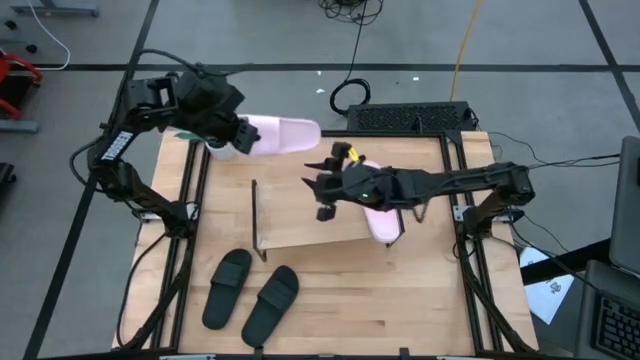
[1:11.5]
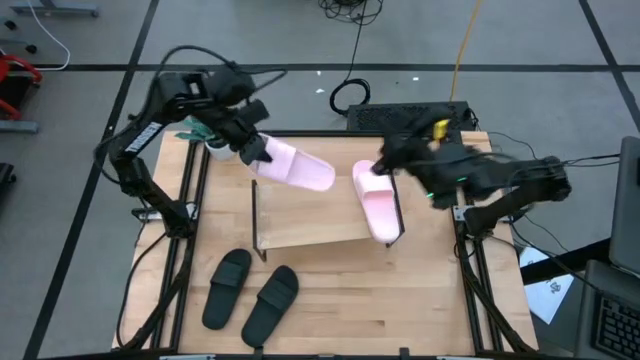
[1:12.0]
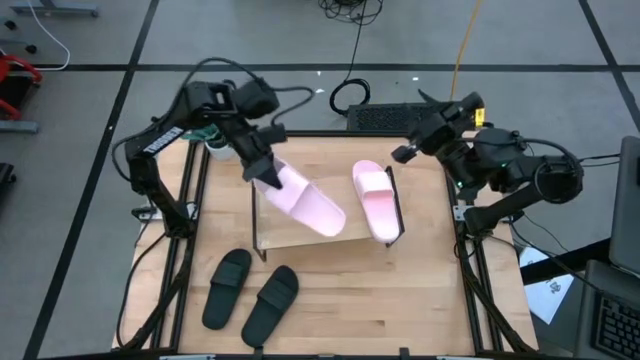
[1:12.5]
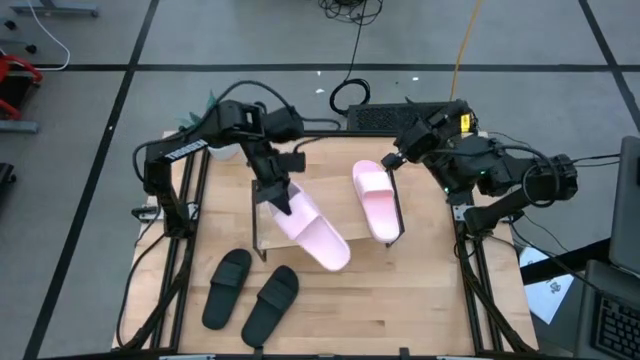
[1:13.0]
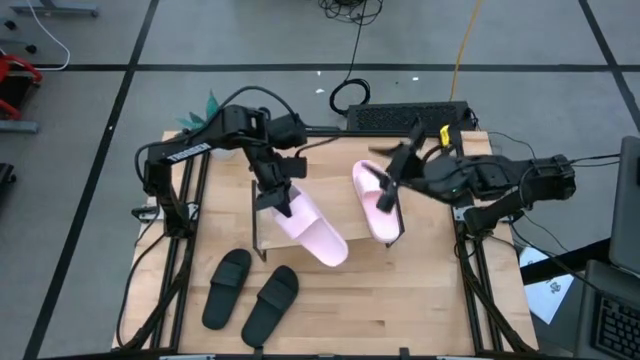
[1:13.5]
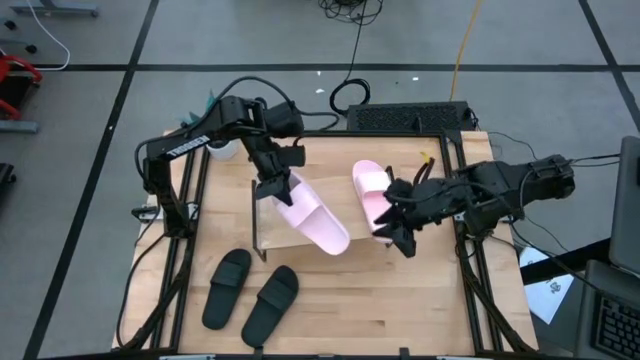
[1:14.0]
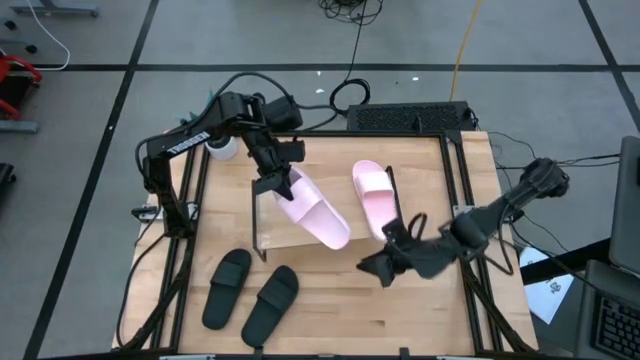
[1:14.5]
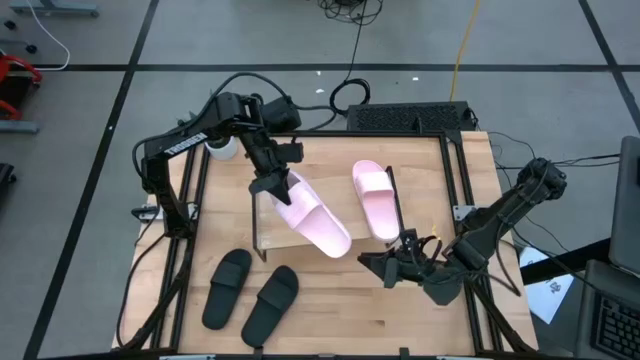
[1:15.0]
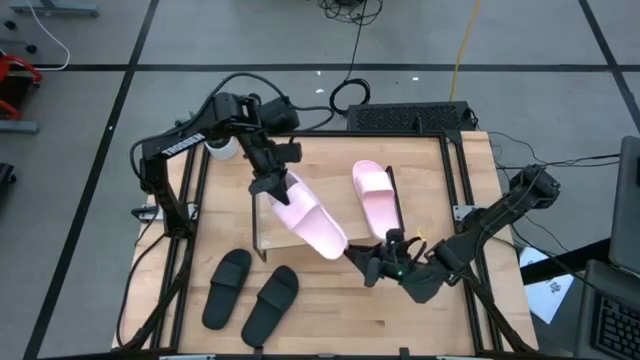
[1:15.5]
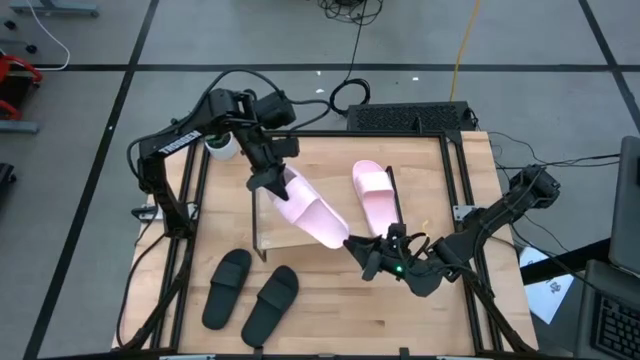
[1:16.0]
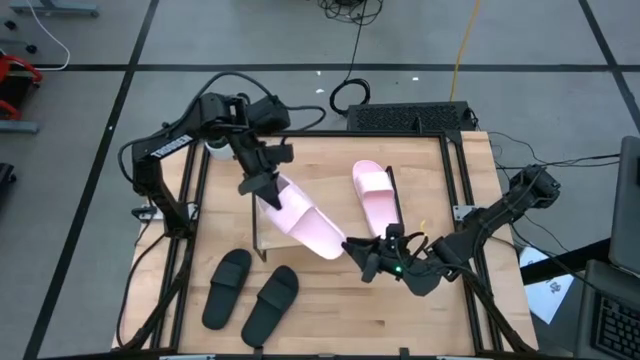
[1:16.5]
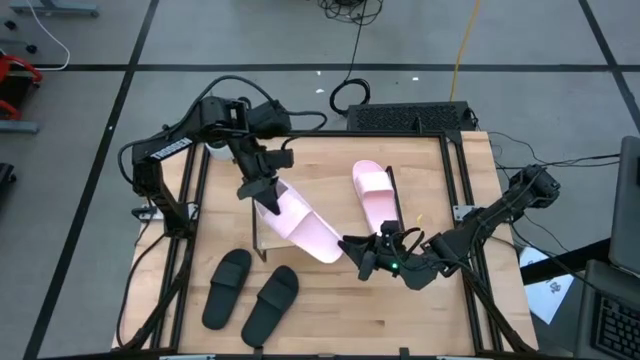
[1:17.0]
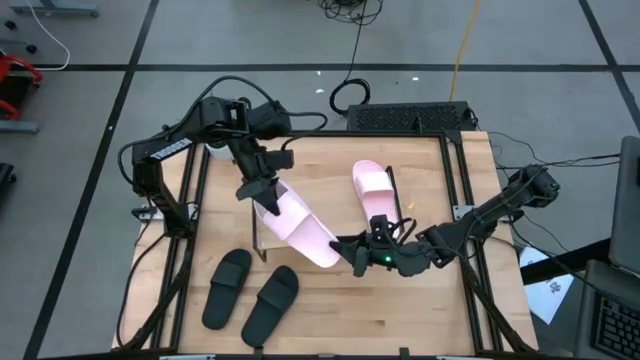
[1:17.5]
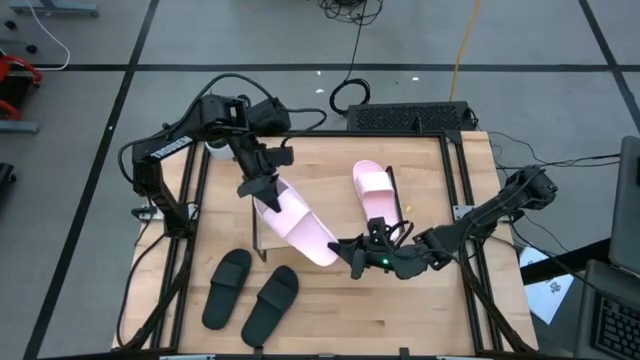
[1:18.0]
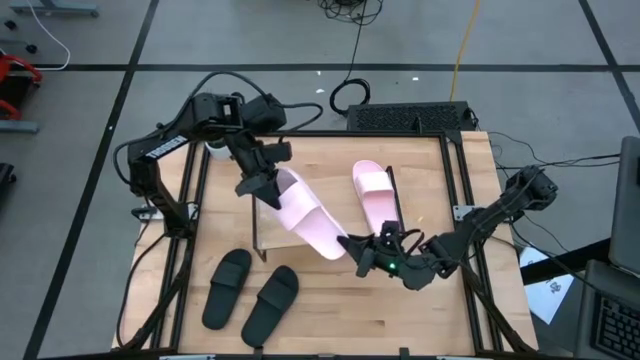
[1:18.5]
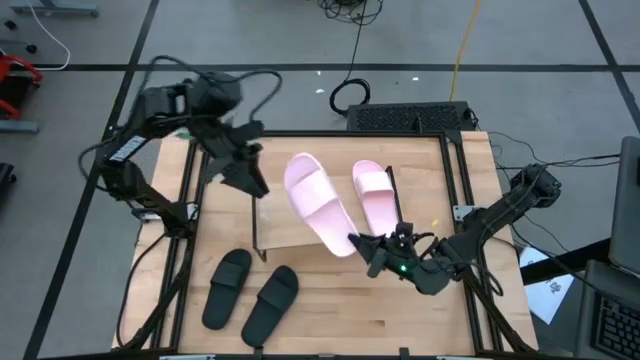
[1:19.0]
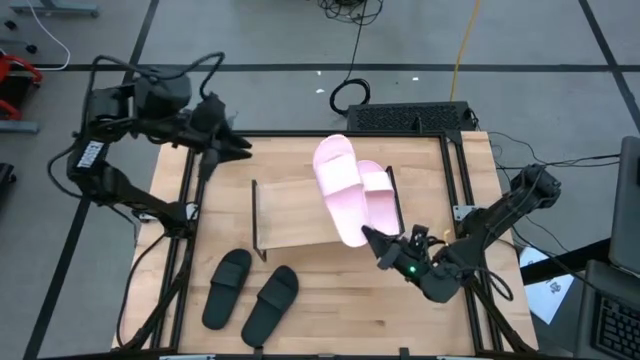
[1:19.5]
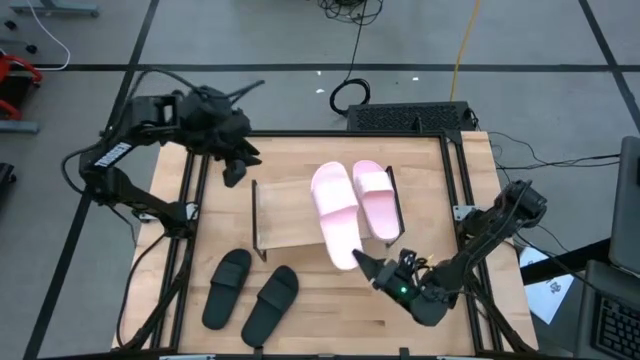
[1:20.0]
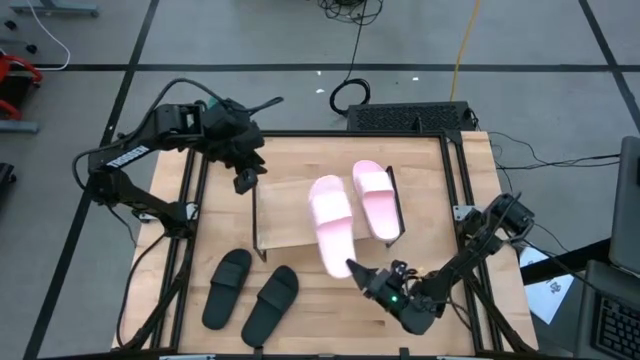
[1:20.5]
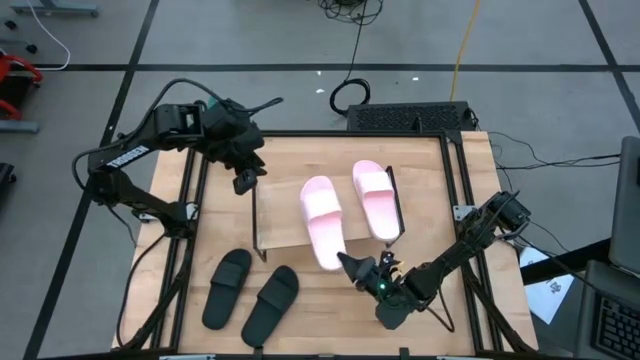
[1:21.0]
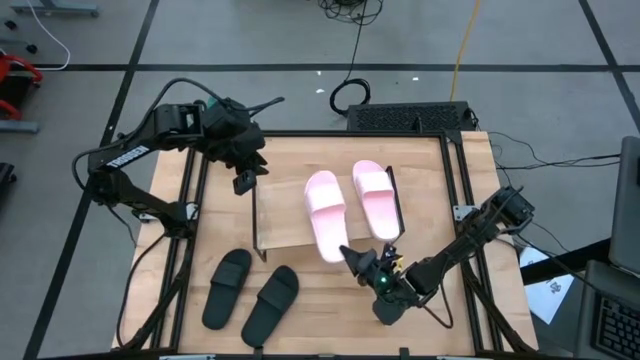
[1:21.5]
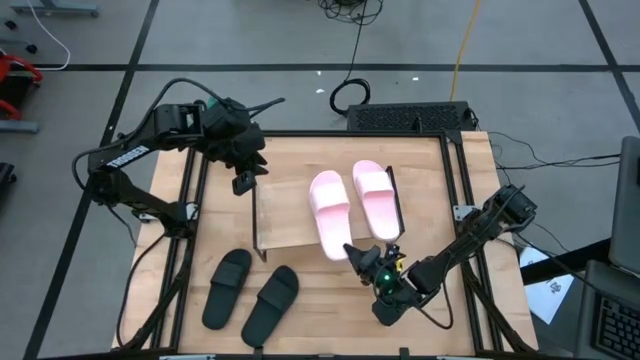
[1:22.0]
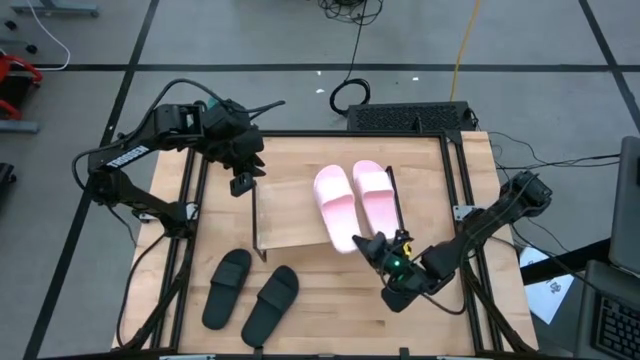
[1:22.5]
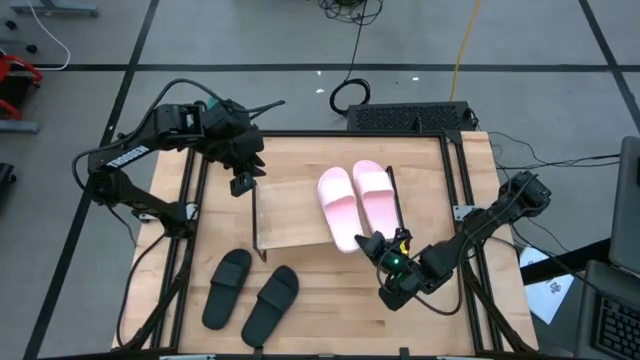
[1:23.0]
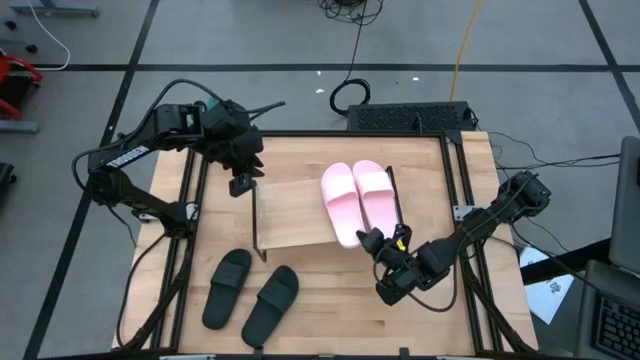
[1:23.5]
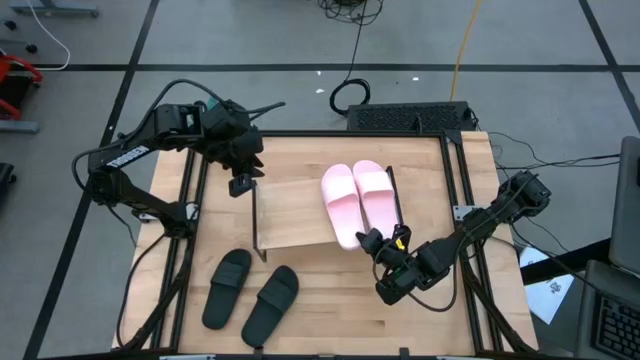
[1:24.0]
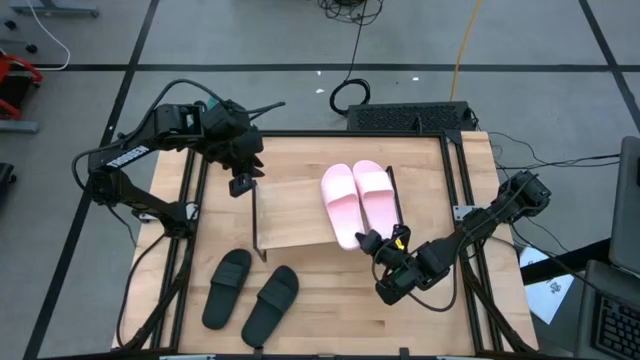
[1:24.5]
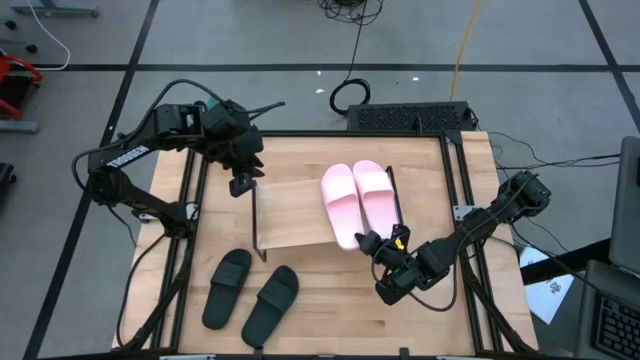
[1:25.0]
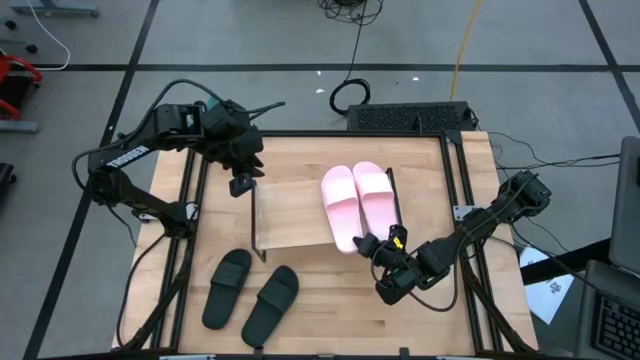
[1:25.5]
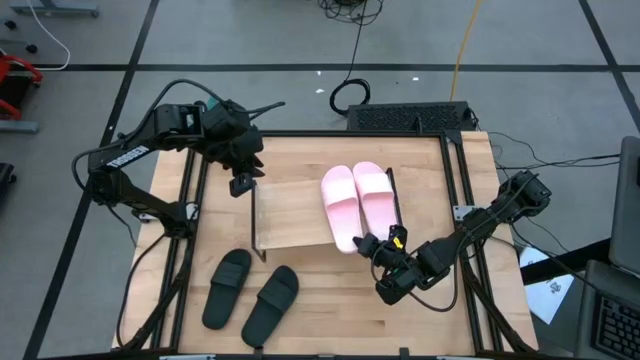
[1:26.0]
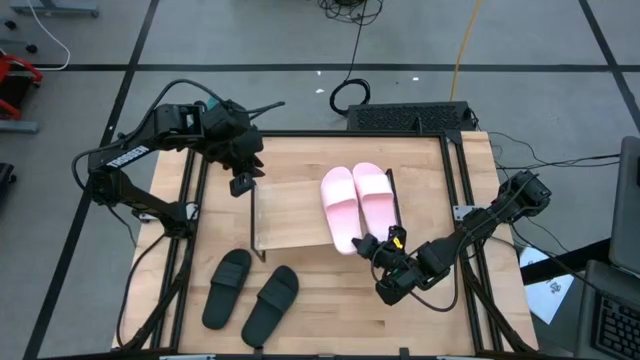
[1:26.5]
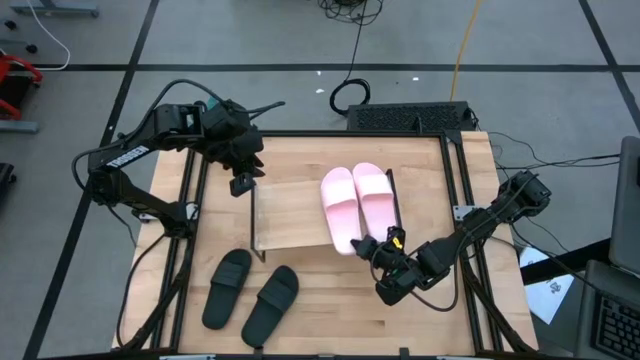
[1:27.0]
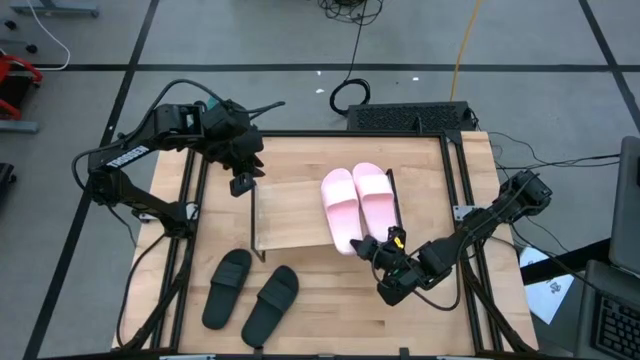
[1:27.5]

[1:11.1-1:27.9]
Task: Pick and place slides into the shelf
Put the pink slipper on the shelf

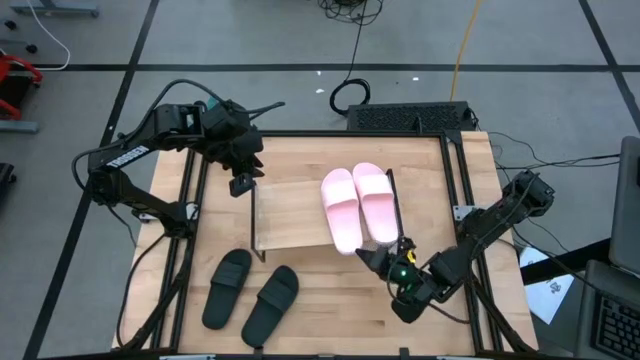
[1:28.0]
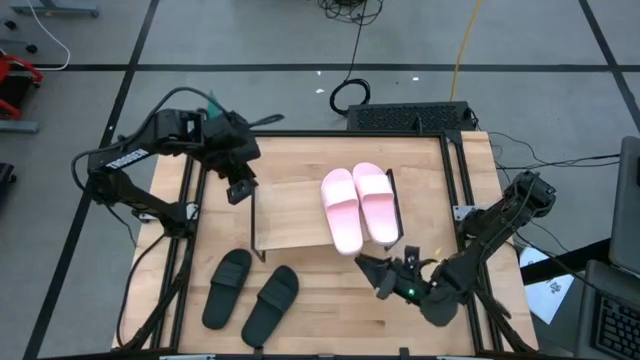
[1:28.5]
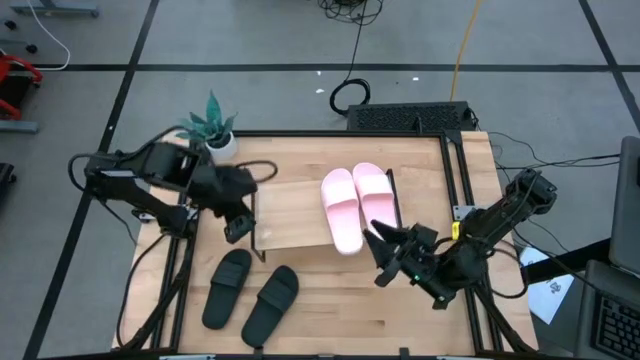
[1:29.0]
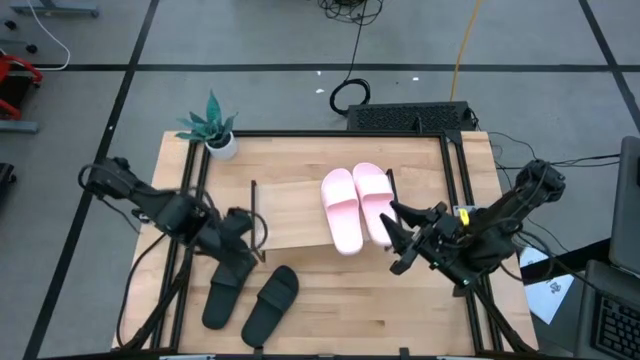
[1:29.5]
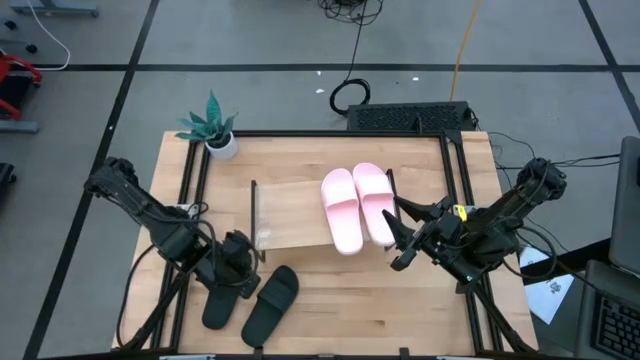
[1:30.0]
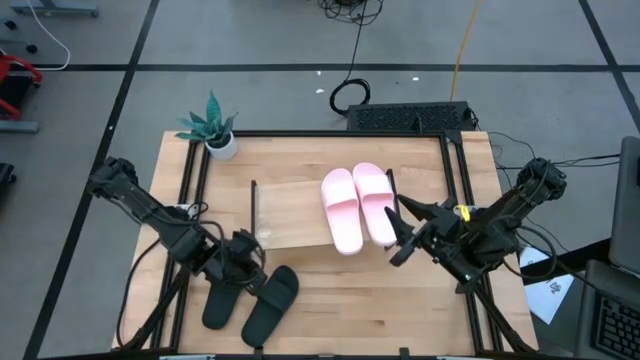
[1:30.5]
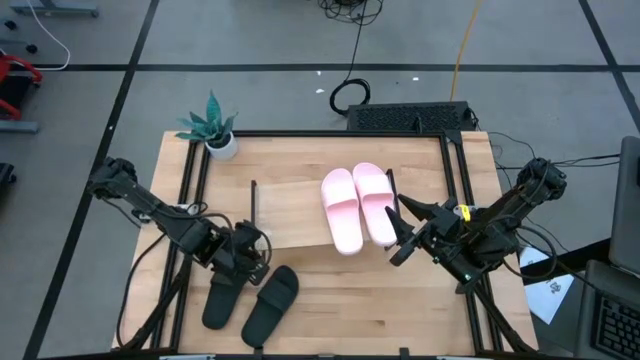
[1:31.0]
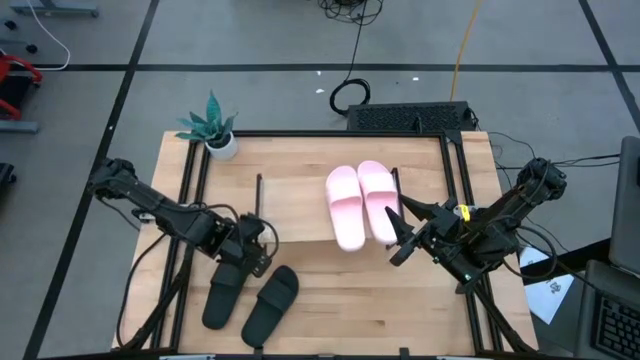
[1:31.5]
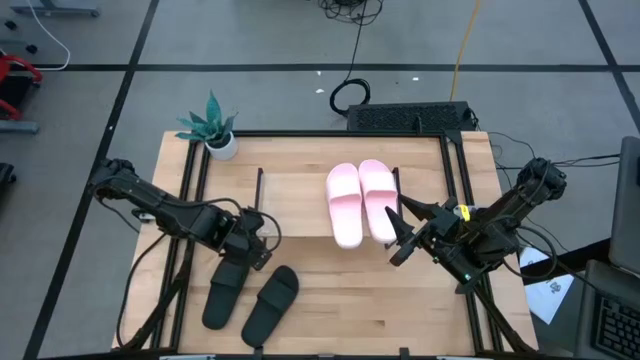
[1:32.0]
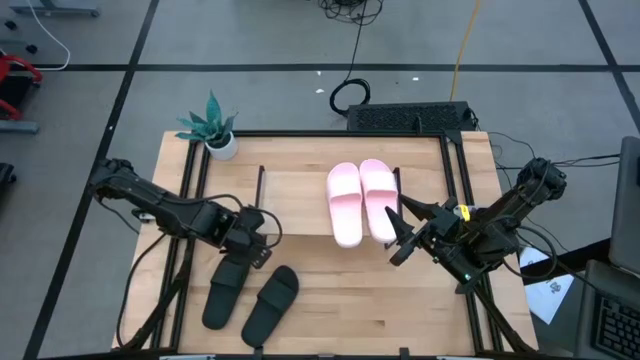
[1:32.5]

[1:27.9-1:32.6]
Adjust the shelf
